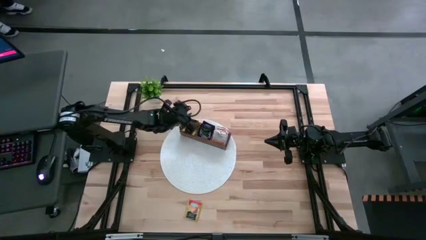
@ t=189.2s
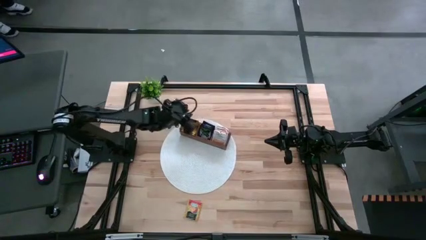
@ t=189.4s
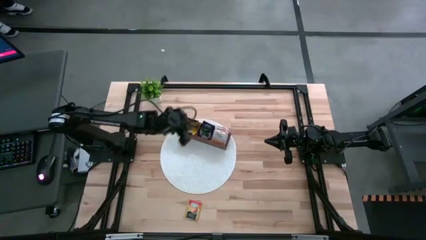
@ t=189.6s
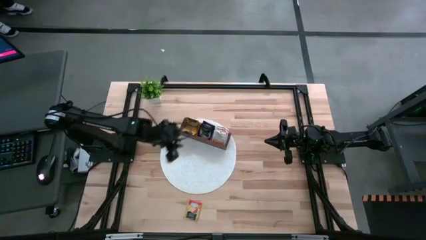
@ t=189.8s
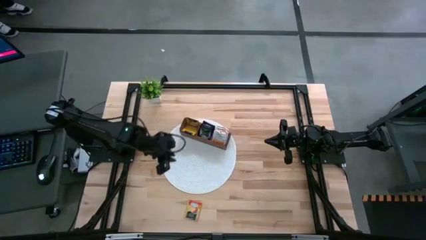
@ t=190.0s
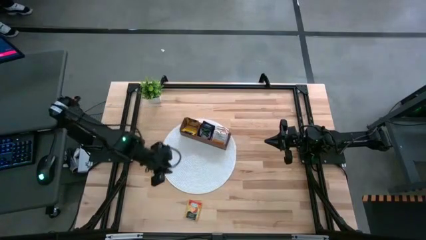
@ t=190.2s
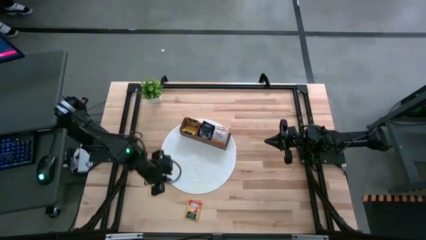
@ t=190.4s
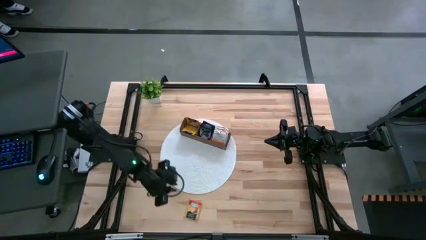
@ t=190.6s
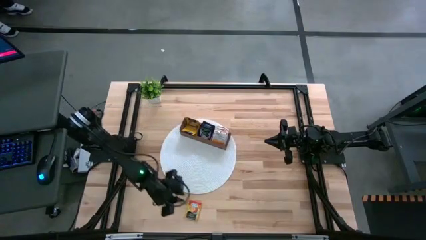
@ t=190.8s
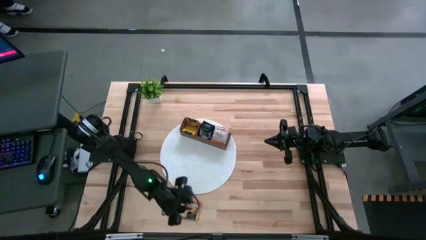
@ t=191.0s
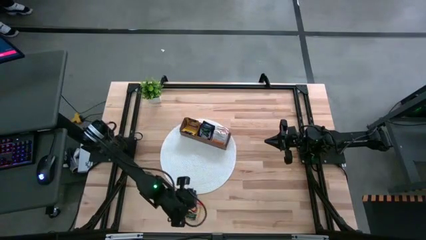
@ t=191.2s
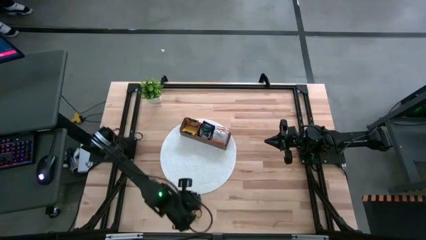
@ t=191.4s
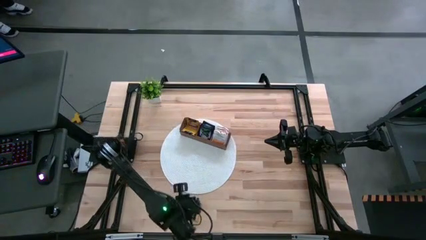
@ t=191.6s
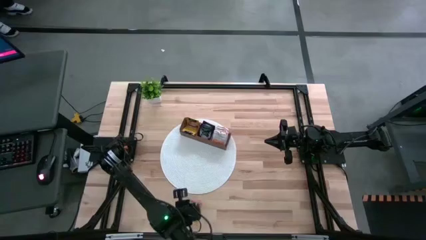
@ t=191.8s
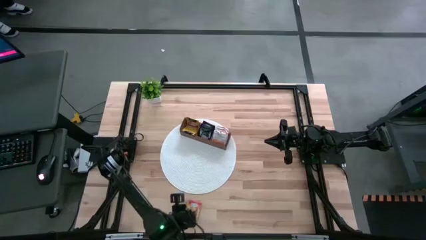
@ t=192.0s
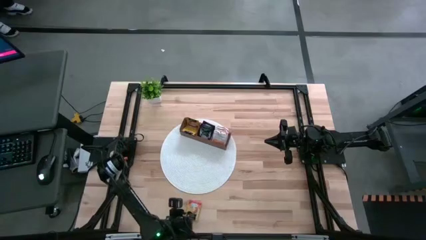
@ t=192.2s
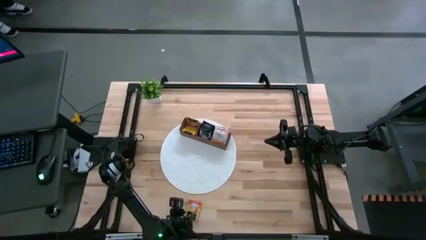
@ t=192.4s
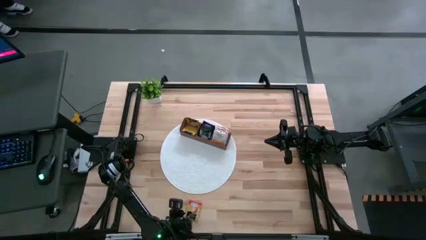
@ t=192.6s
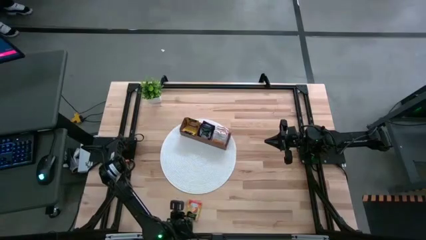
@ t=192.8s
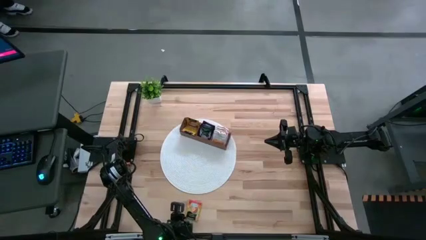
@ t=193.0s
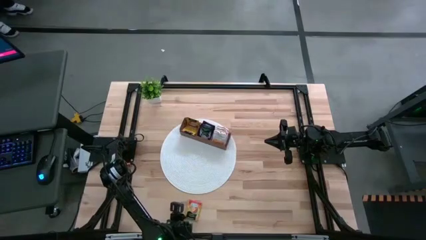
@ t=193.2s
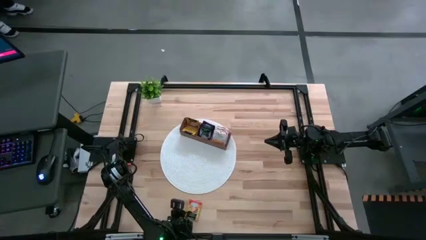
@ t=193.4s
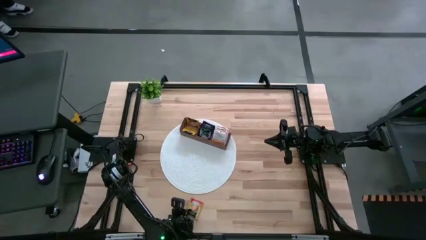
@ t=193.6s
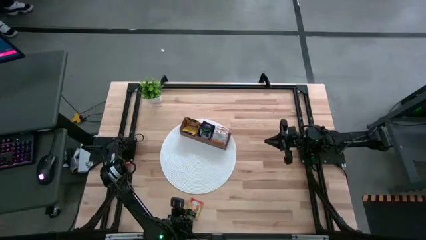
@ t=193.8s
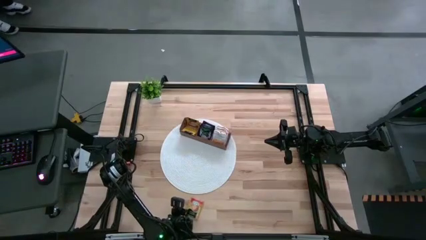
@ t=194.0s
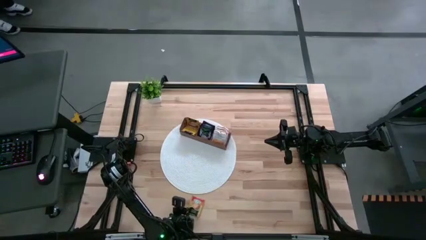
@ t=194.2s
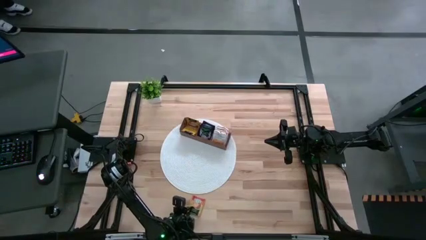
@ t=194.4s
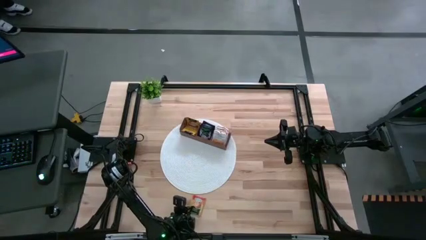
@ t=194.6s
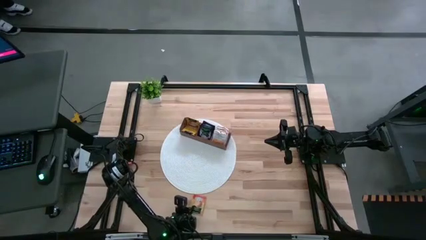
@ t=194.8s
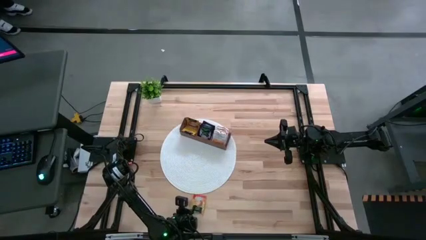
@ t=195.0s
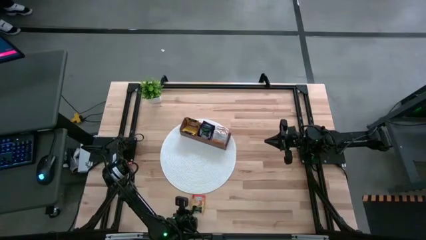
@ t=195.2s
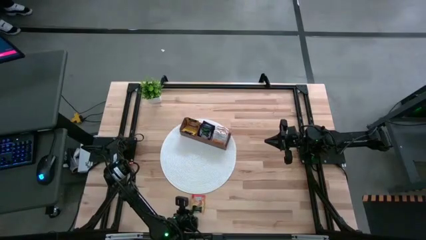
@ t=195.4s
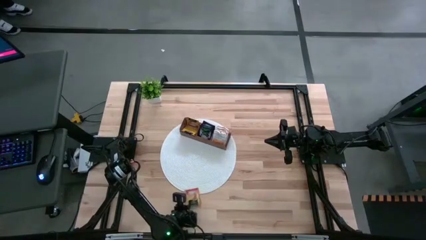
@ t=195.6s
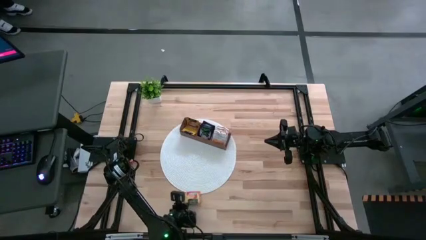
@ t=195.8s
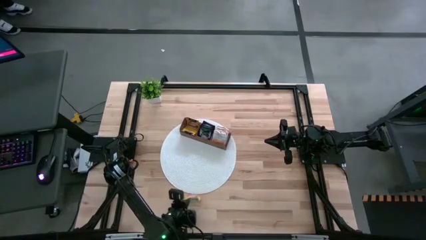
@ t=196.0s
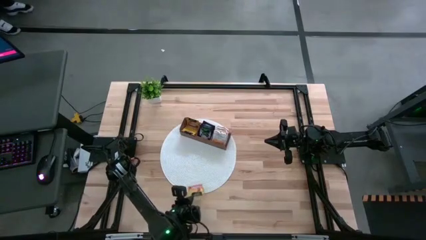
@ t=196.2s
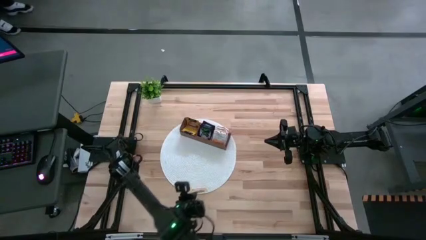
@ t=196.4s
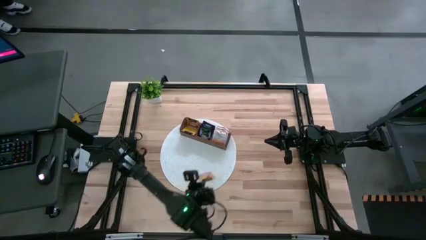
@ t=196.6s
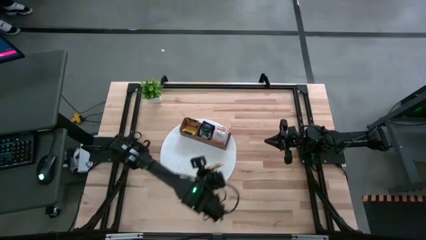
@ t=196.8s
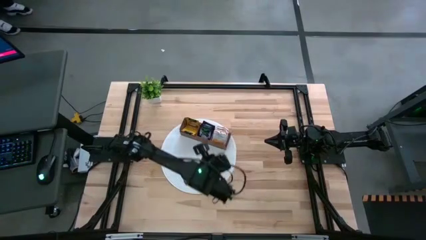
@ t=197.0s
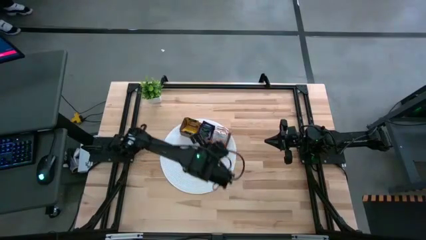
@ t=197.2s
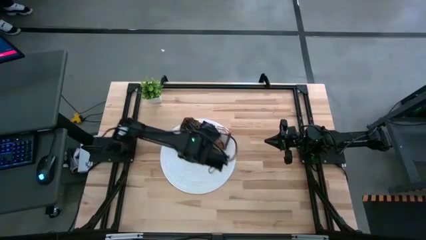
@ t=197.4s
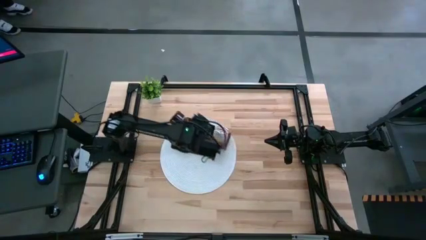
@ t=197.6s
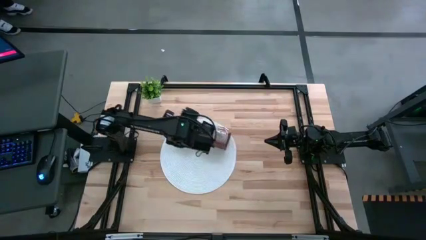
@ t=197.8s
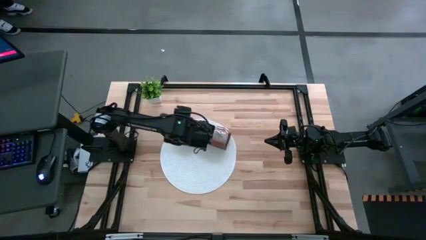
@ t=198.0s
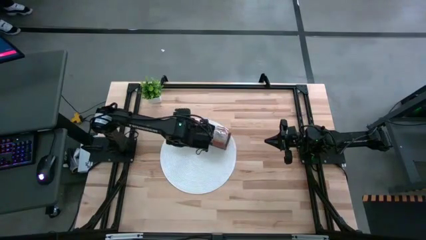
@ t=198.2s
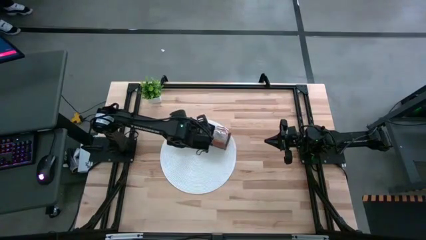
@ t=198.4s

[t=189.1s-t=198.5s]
Task: Pick & Place Tea
Put the orange tea bag into the left section of the wooden organizer

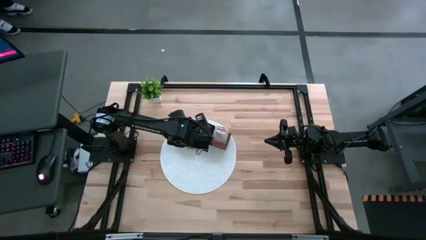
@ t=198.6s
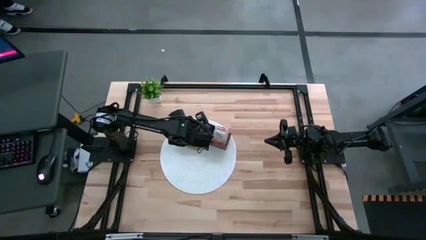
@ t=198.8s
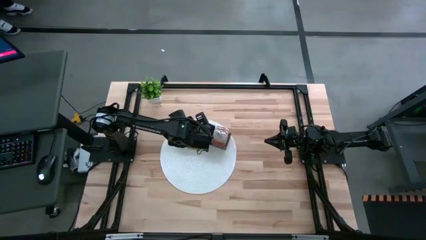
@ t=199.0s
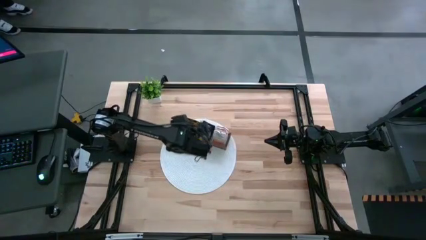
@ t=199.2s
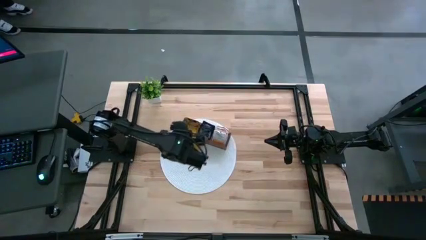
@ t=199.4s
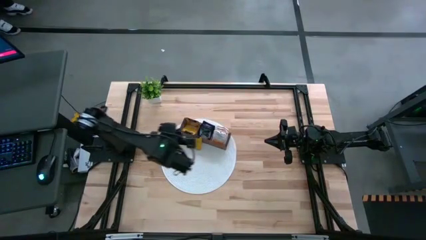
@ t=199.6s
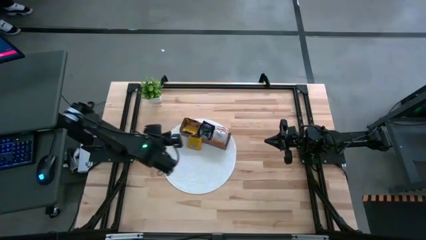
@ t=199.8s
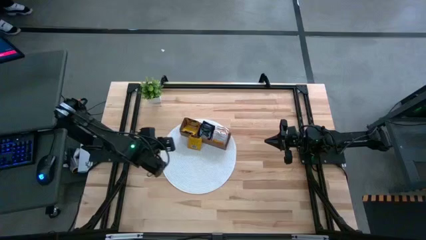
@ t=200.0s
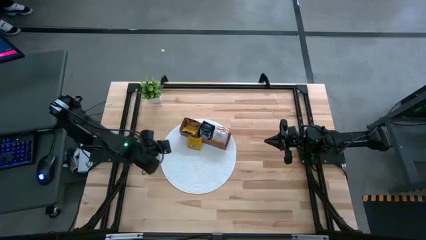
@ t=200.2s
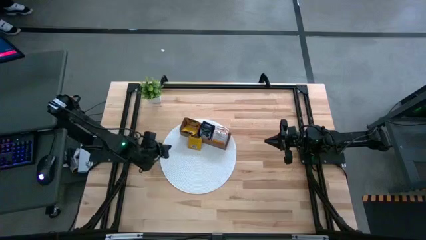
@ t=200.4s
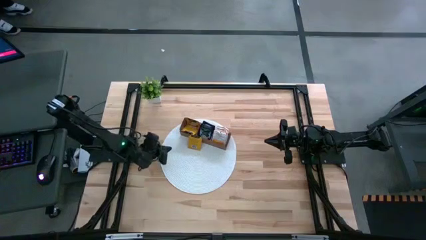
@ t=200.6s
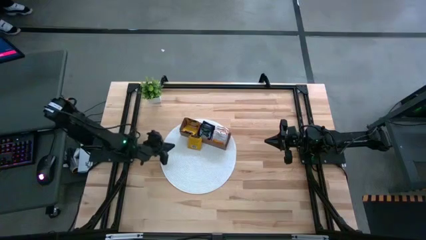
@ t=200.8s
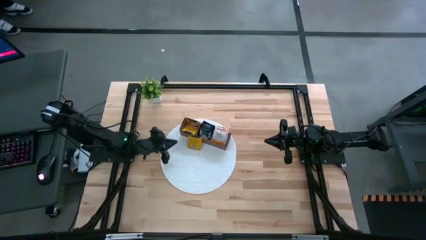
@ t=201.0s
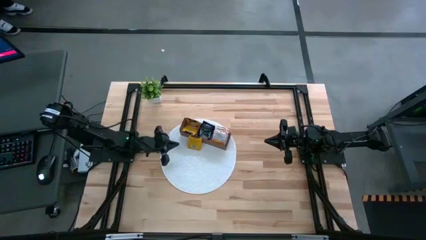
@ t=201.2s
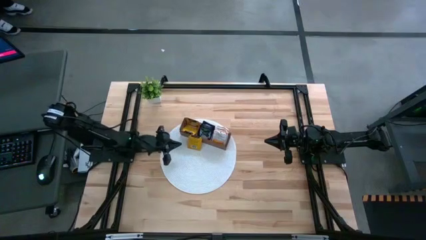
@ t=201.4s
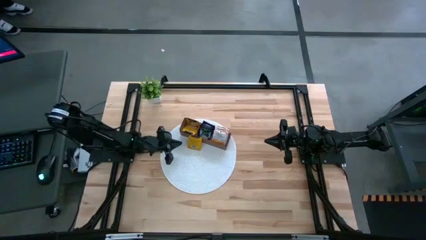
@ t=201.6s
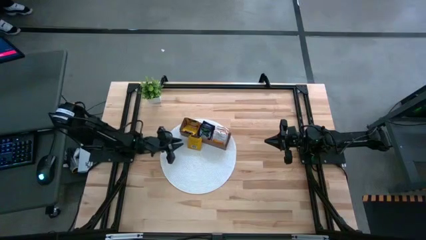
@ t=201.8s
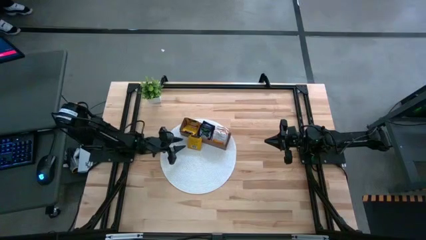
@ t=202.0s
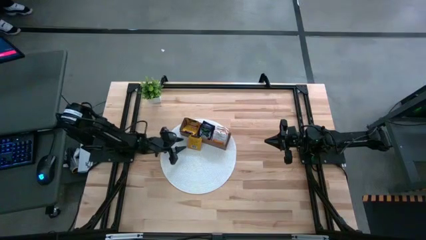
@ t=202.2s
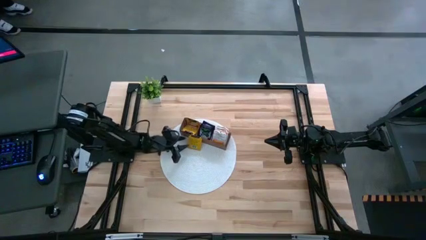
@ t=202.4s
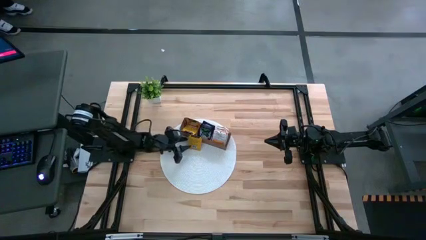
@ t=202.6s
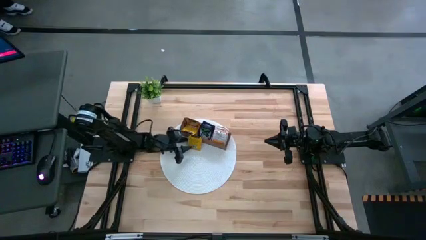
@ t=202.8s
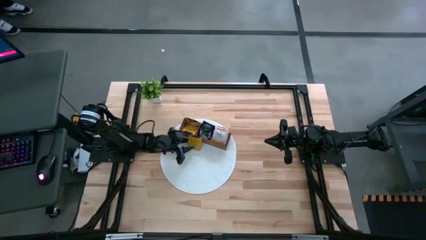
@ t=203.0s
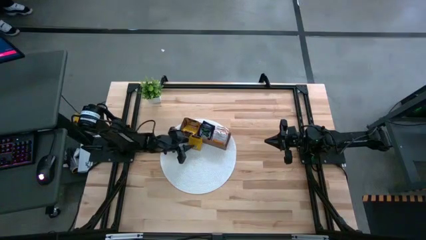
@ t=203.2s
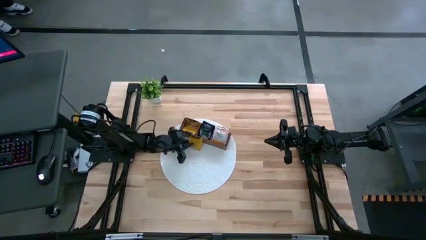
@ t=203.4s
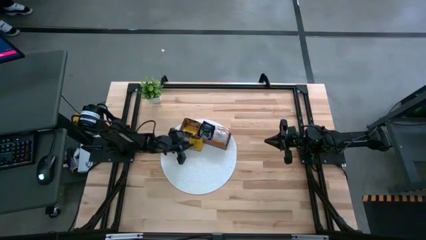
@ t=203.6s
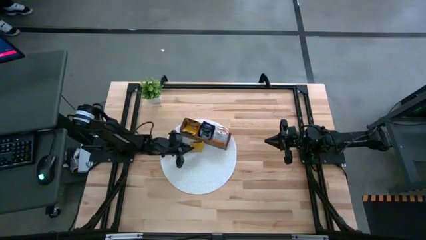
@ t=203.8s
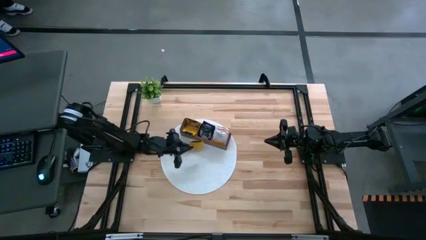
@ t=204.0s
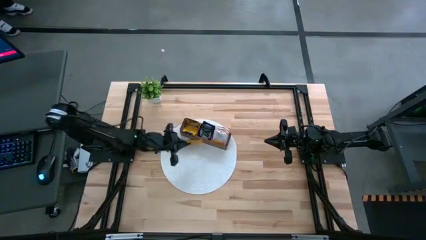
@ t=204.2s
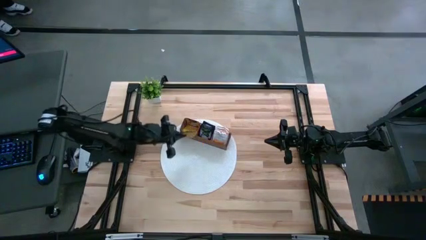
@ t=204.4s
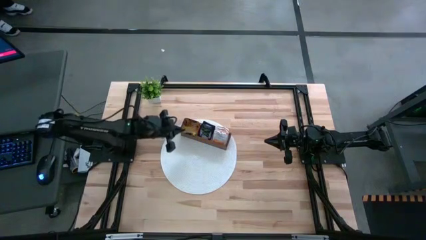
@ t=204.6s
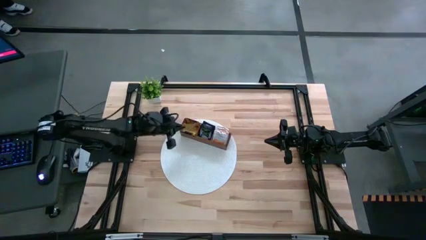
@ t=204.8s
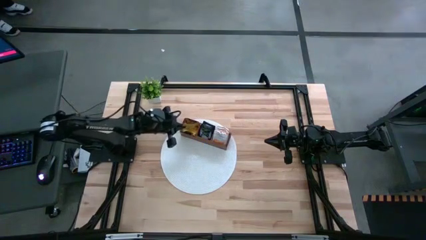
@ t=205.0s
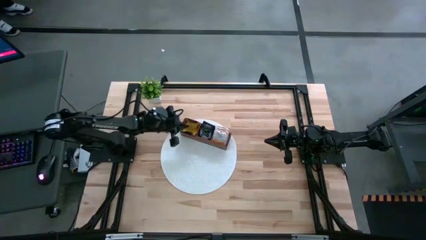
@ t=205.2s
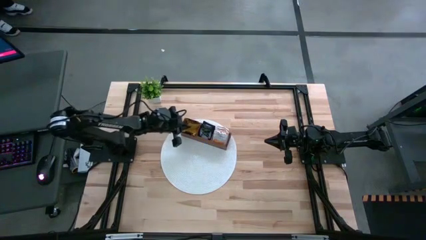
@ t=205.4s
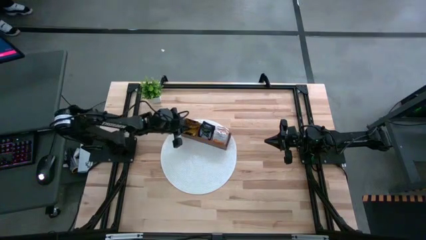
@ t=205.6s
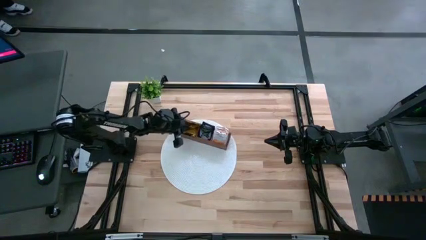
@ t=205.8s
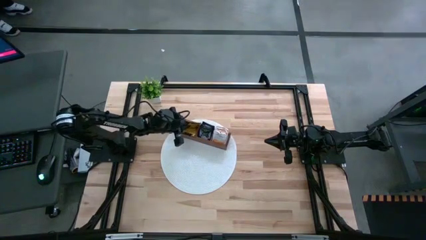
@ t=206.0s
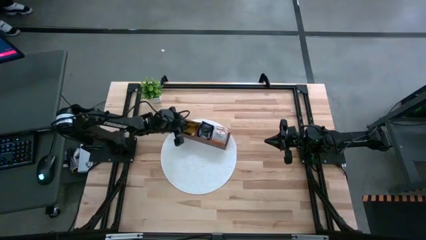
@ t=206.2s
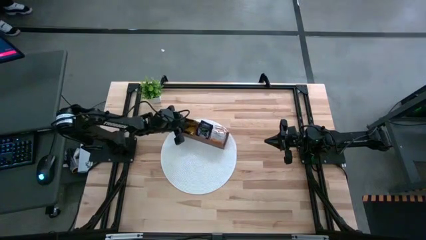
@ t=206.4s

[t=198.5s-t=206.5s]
Put the orange tea bag into the left section of the wooden organizer
